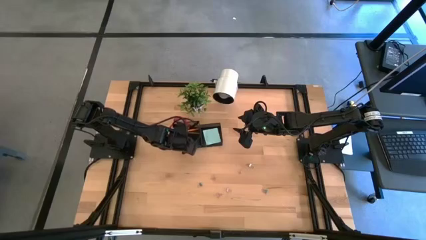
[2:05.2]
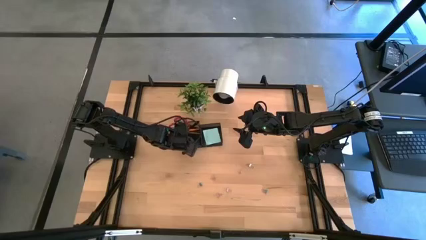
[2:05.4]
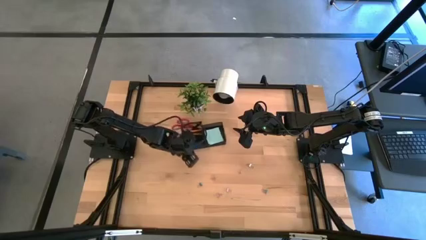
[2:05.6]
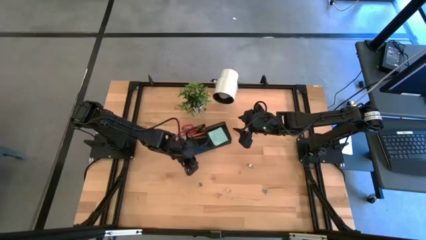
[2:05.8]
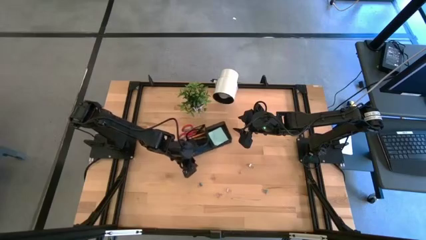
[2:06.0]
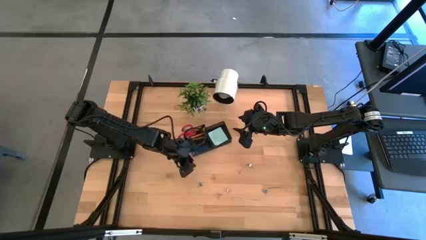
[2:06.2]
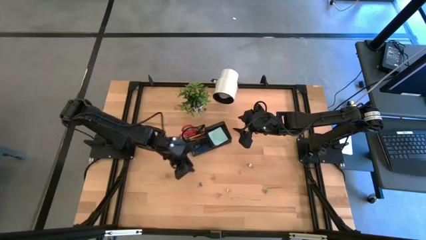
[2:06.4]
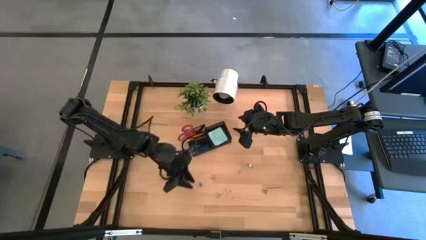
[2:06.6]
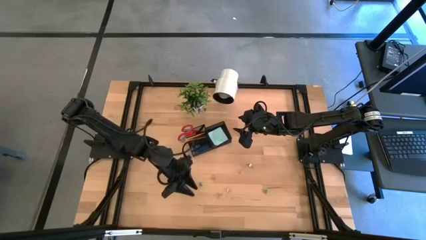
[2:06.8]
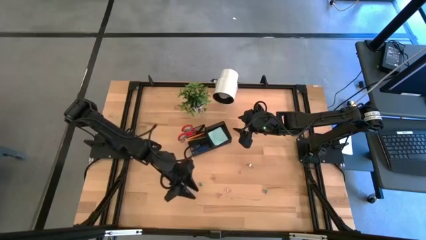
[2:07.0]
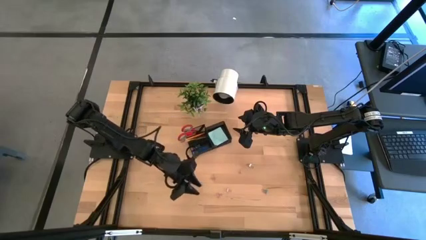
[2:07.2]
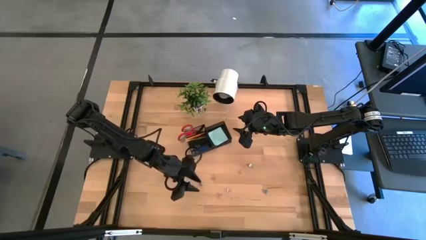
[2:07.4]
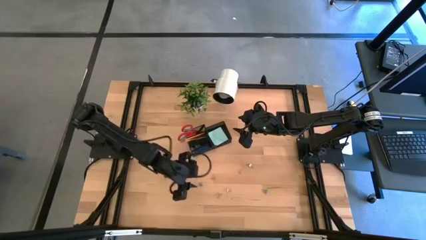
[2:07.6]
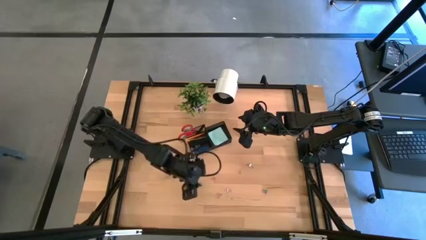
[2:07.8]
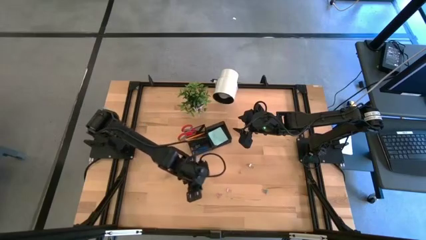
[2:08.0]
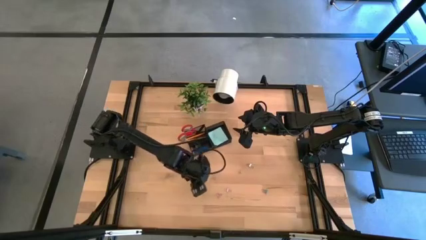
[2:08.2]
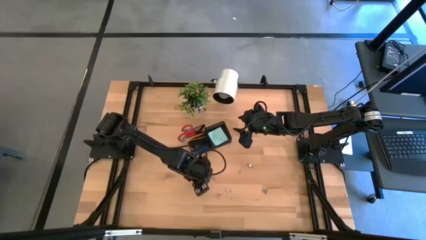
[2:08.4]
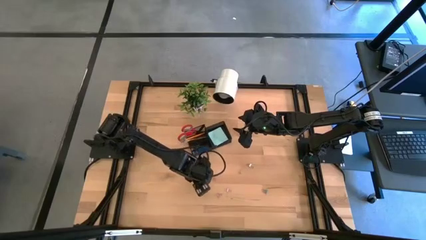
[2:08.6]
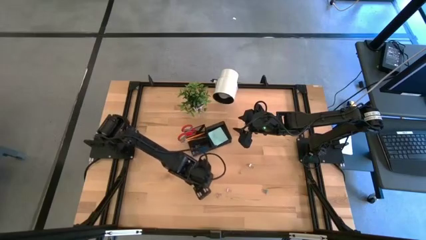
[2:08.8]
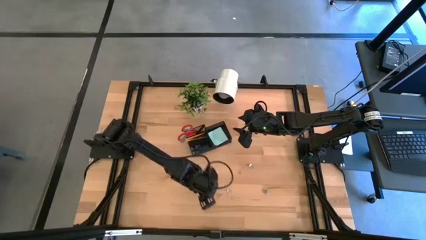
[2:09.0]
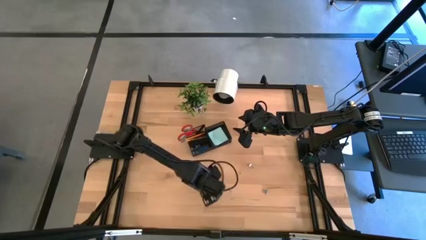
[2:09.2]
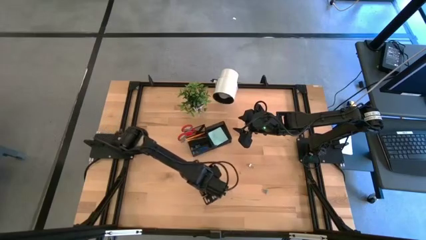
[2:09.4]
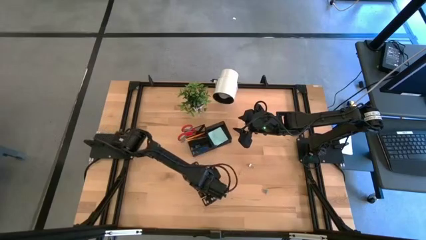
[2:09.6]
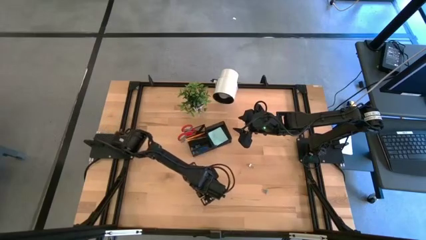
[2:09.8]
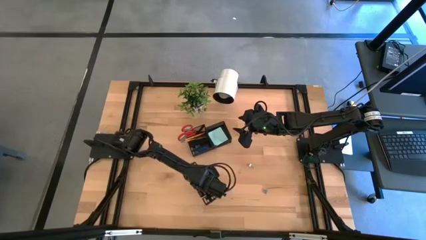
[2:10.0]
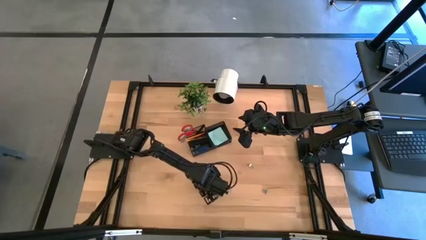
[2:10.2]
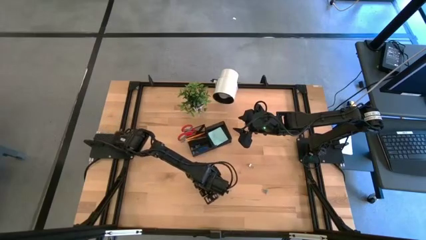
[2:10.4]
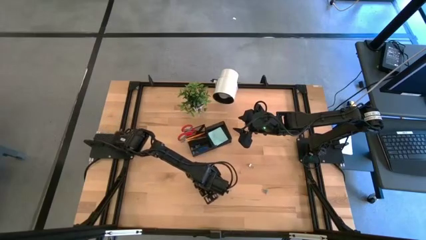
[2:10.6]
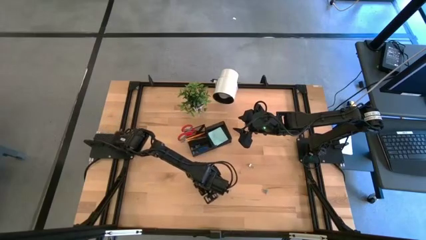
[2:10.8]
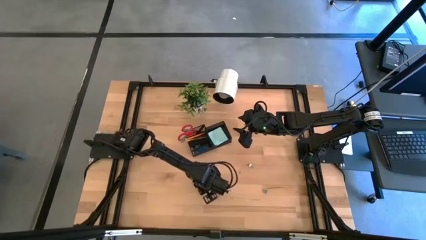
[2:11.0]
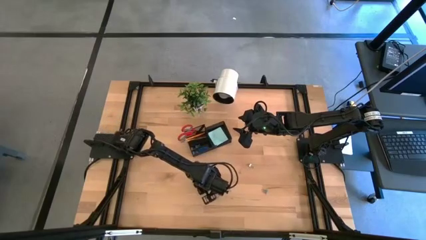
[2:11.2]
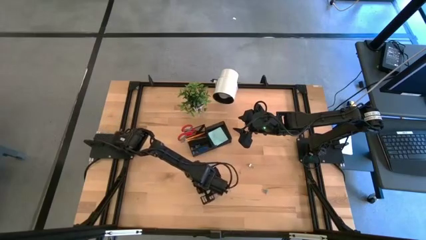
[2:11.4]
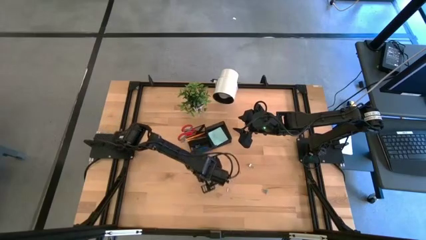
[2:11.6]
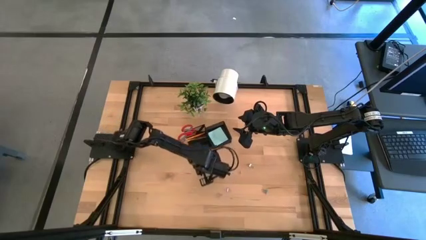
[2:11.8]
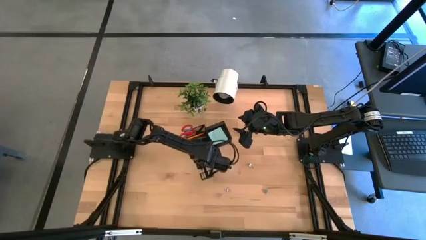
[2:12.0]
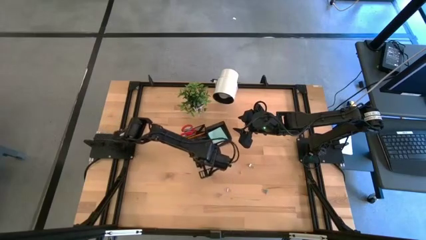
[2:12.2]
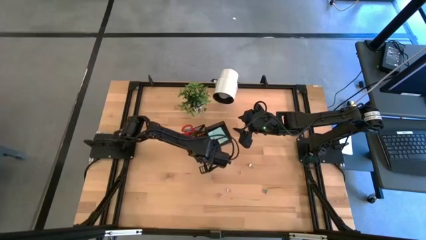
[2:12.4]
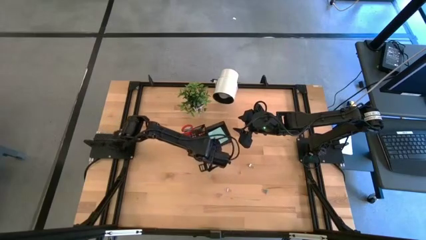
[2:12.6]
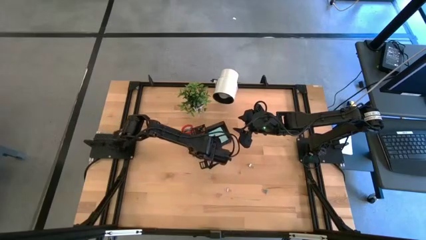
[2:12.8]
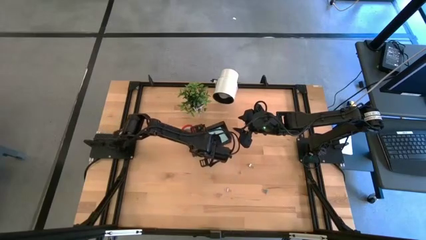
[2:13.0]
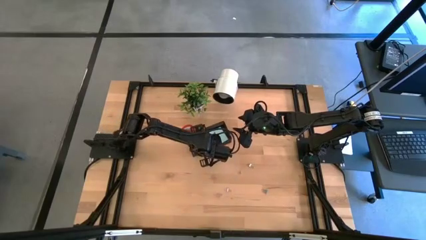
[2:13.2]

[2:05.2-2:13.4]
Task: Pick and place office supplies into organizer
Put the blue binder clip into the black desk organizer

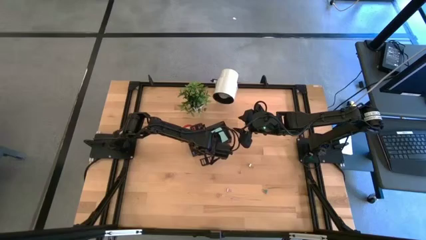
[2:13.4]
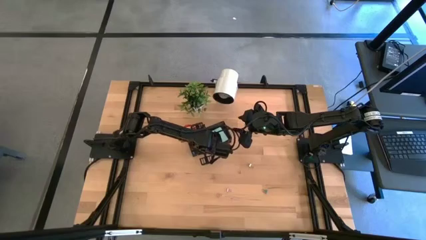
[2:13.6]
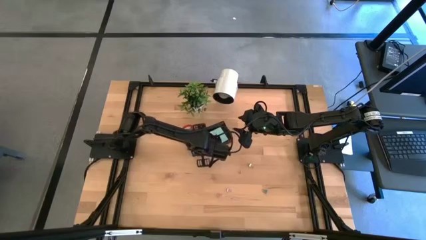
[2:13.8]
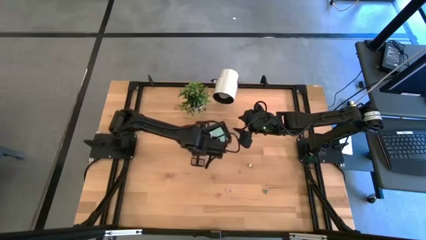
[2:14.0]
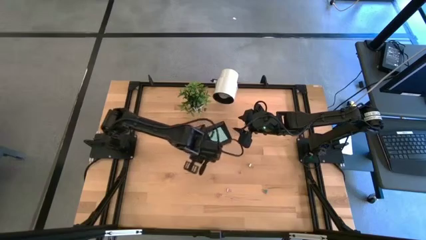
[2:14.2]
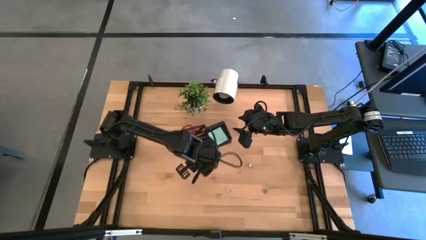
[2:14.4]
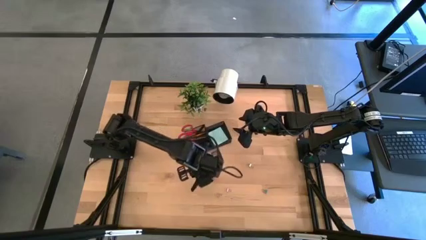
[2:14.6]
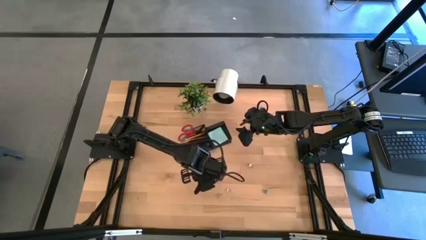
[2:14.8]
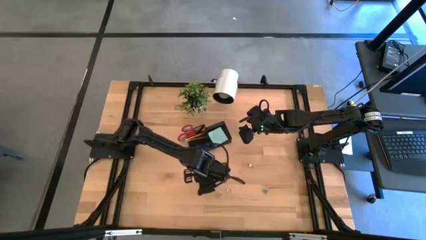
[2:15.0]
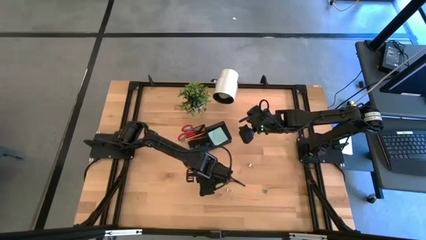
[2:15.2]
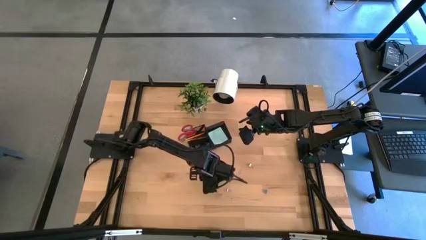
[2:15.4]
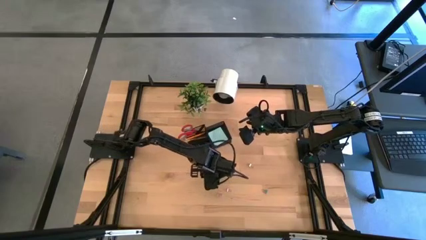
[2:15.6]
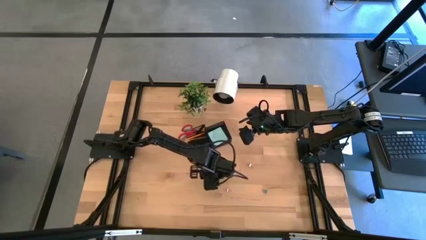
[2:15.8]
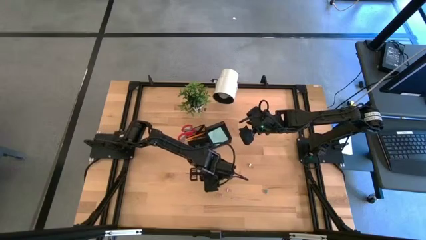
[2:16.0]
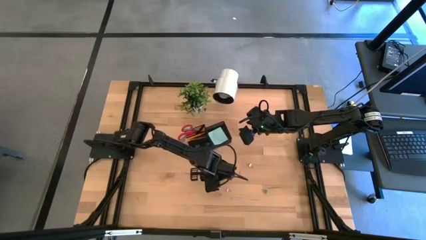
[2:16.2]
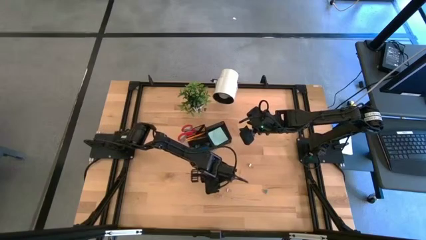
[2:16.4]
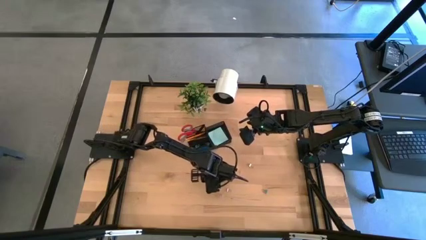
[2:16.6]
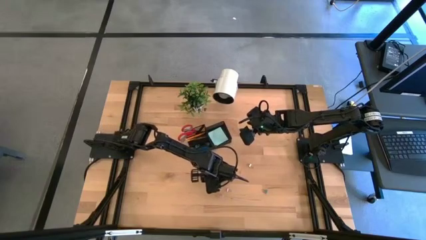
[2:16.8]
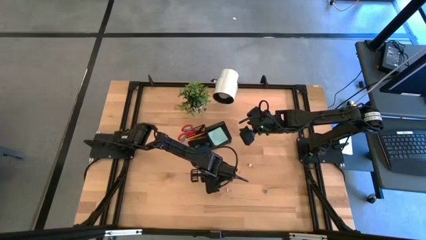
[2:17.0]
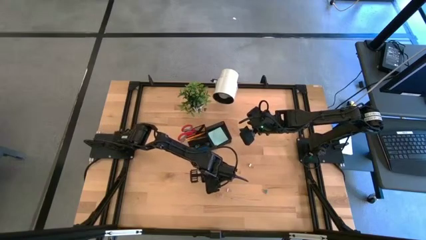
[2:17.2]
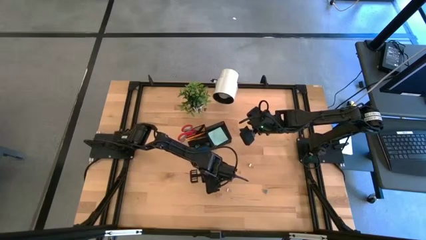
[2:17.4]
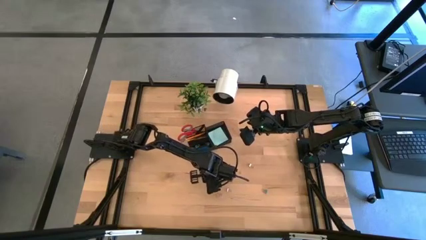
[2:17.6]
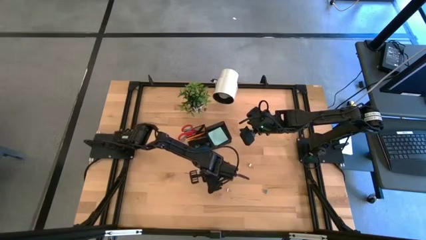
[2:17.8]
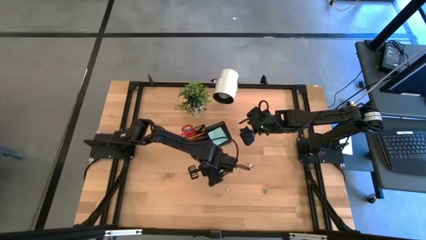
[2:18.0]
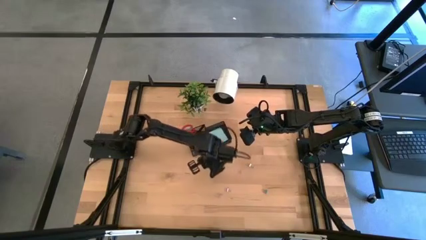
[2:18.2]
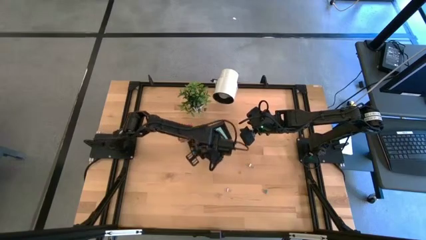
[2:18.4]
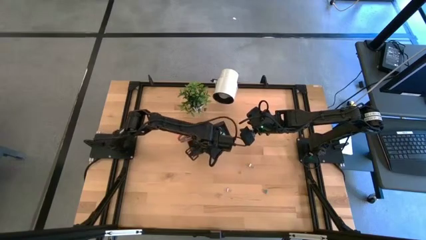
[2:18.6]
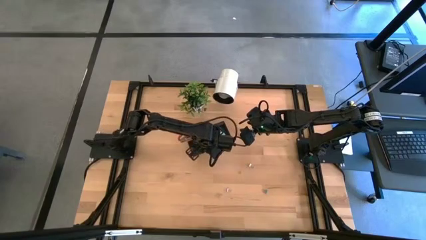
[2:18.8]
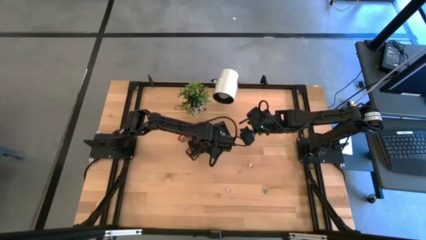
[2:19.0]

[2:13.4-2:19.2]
Put the pink binder clip into the black desk organizer
